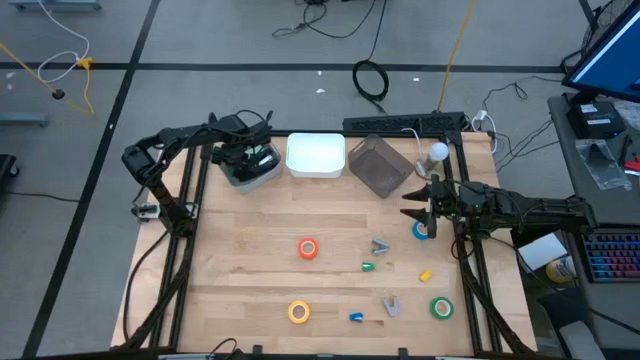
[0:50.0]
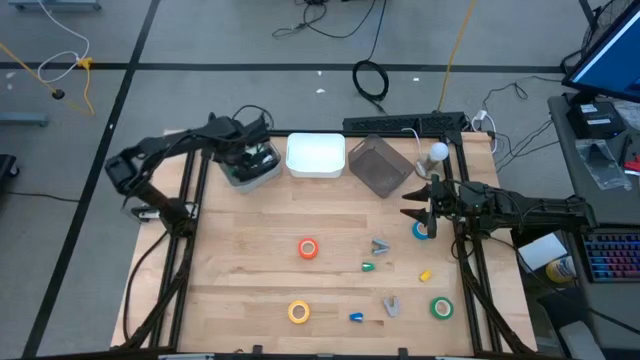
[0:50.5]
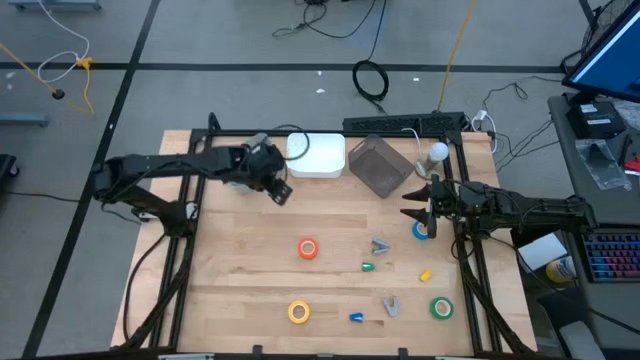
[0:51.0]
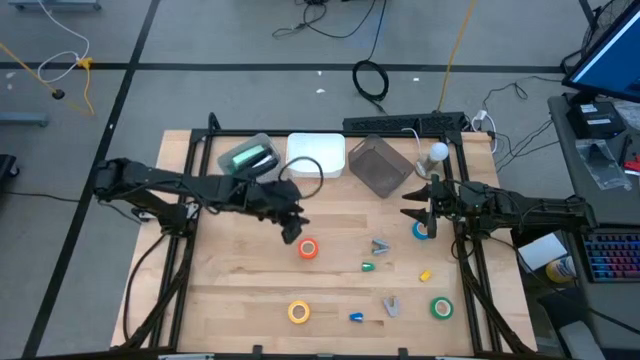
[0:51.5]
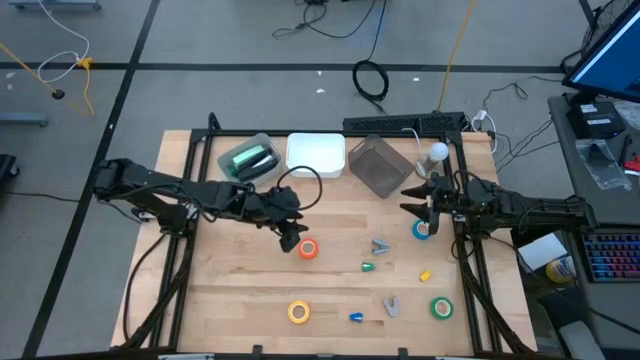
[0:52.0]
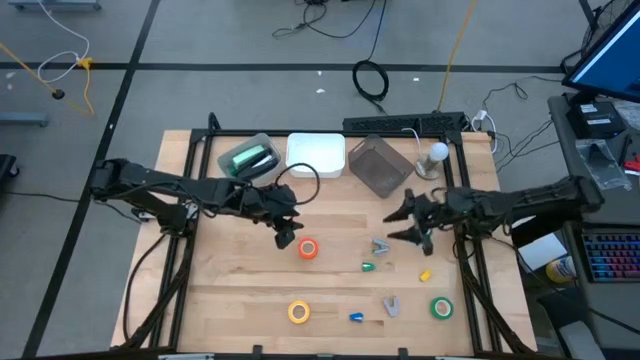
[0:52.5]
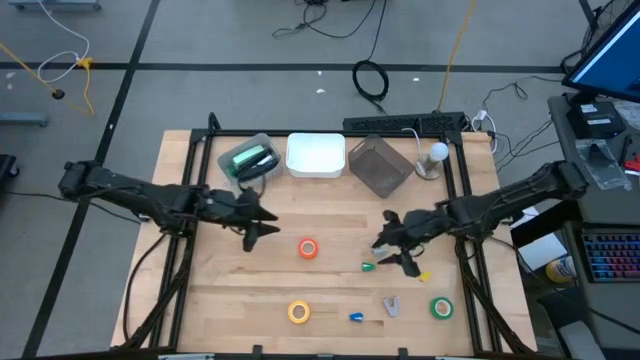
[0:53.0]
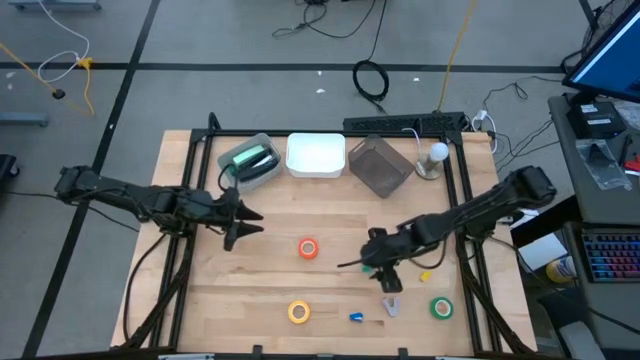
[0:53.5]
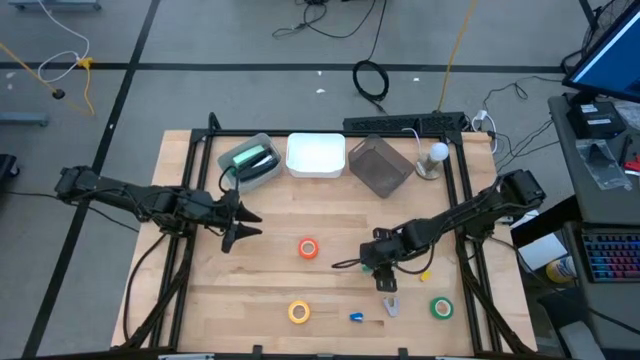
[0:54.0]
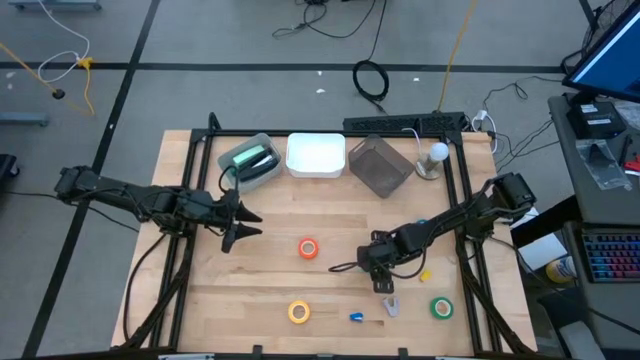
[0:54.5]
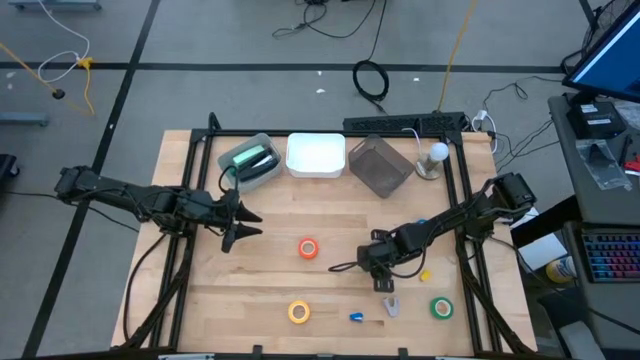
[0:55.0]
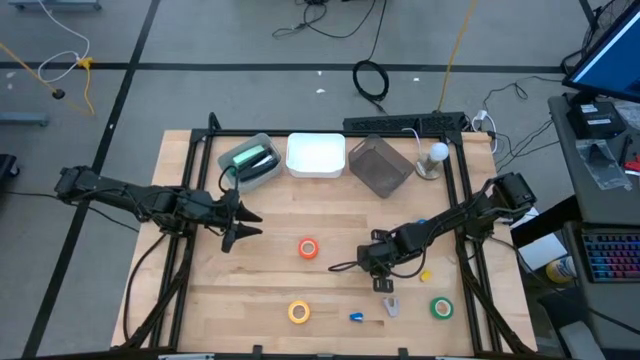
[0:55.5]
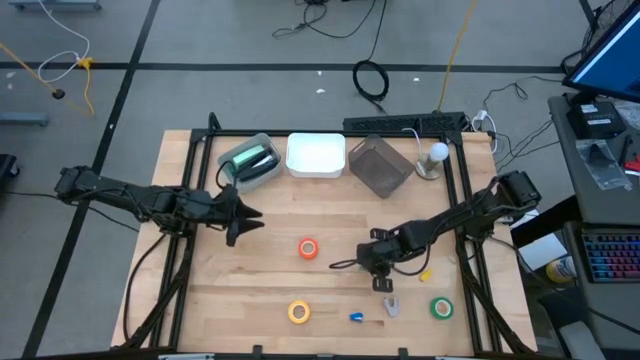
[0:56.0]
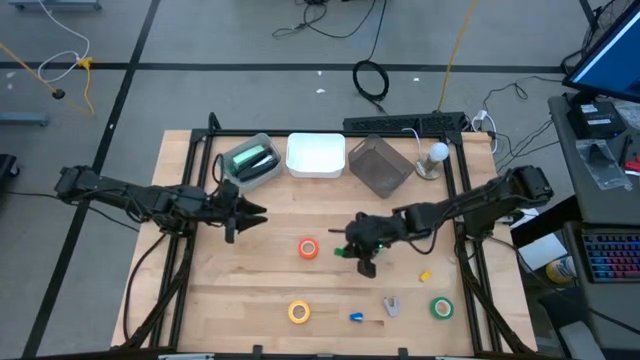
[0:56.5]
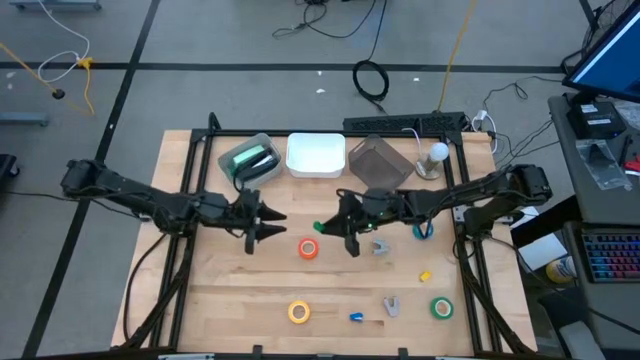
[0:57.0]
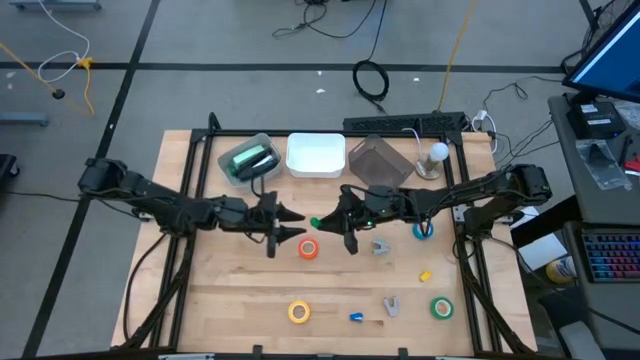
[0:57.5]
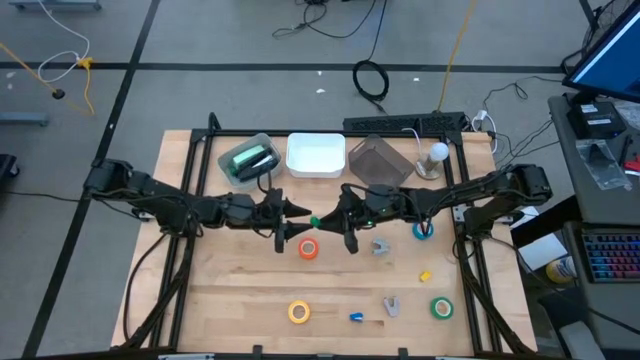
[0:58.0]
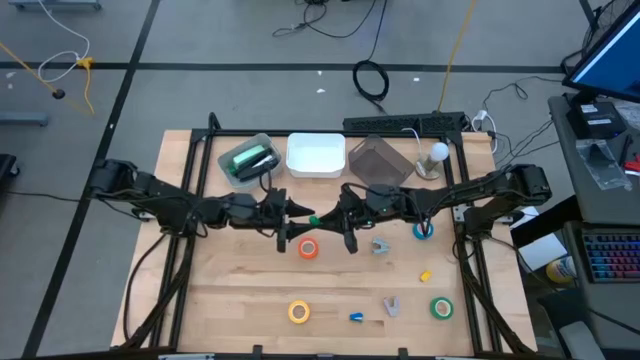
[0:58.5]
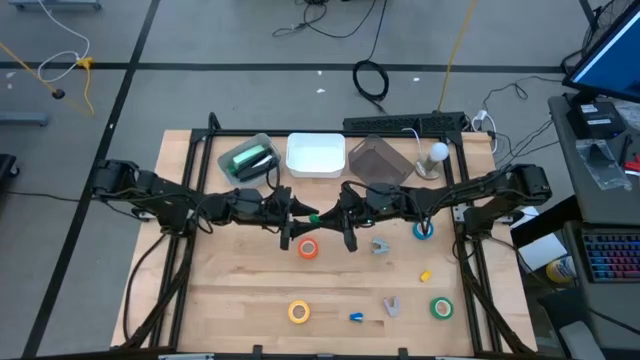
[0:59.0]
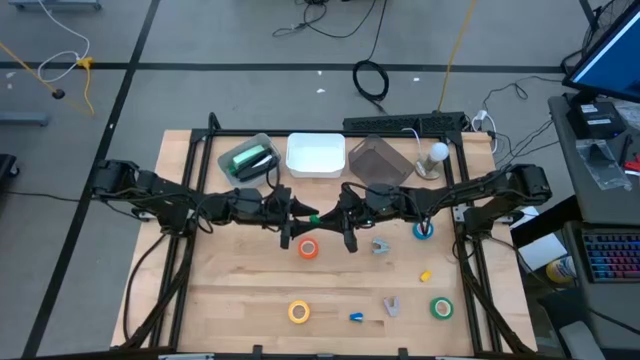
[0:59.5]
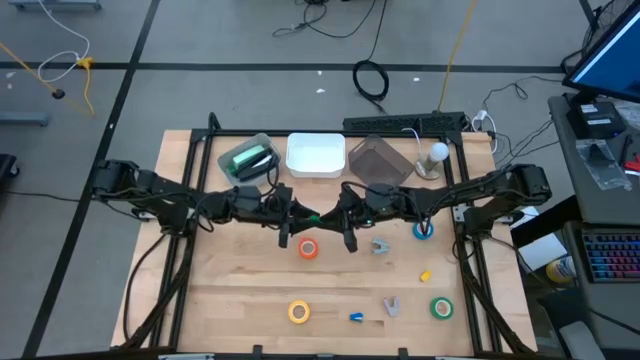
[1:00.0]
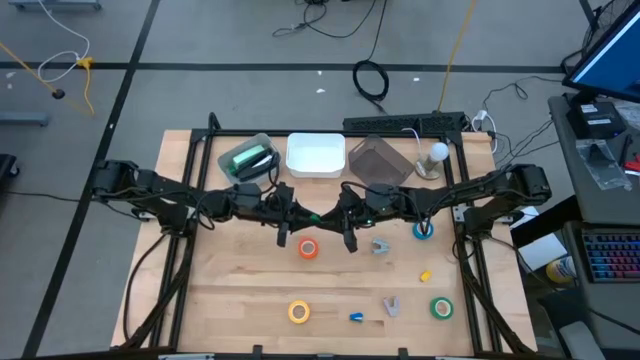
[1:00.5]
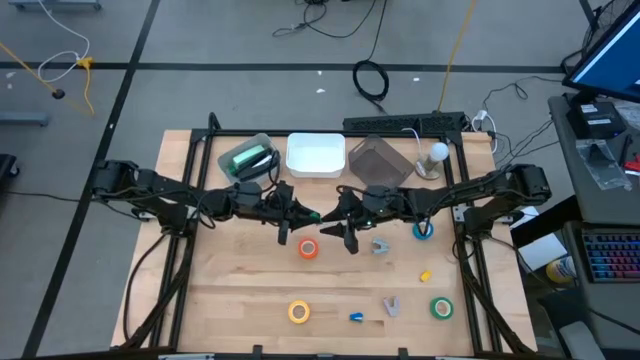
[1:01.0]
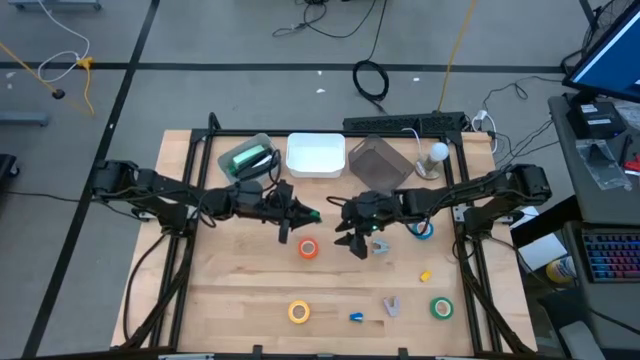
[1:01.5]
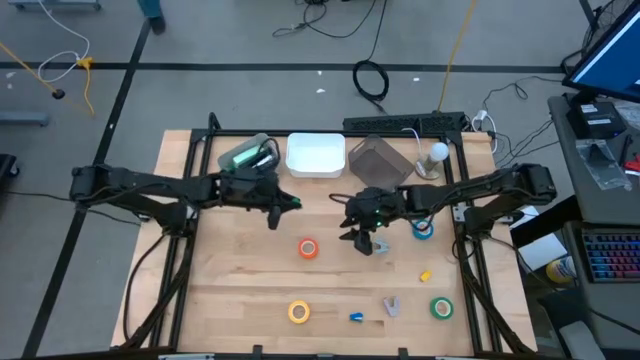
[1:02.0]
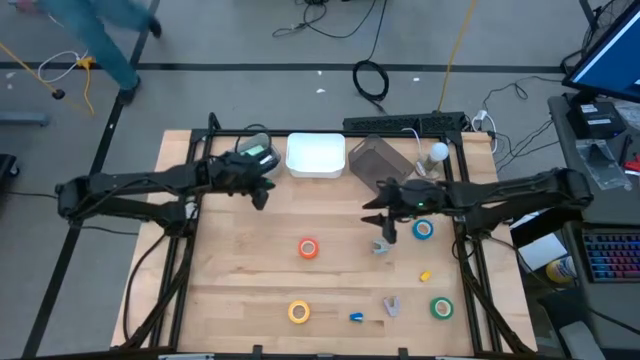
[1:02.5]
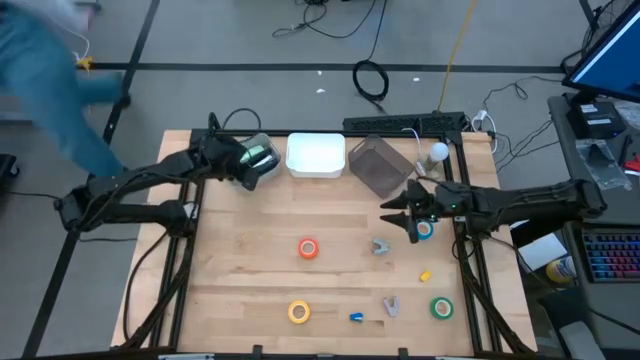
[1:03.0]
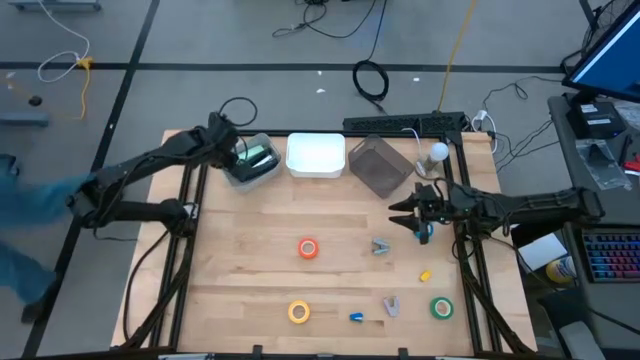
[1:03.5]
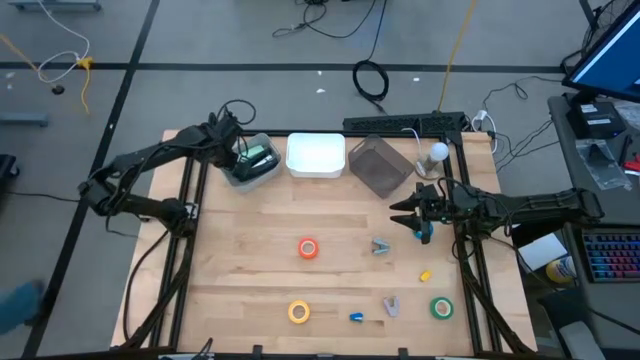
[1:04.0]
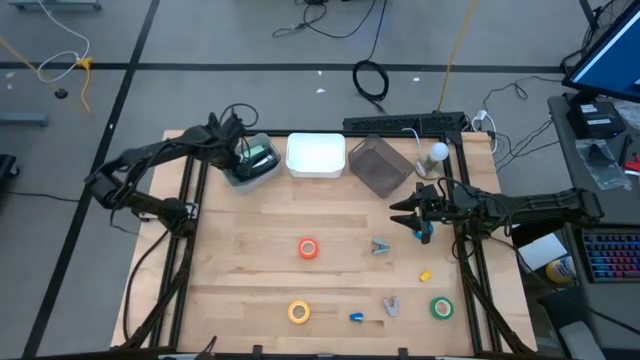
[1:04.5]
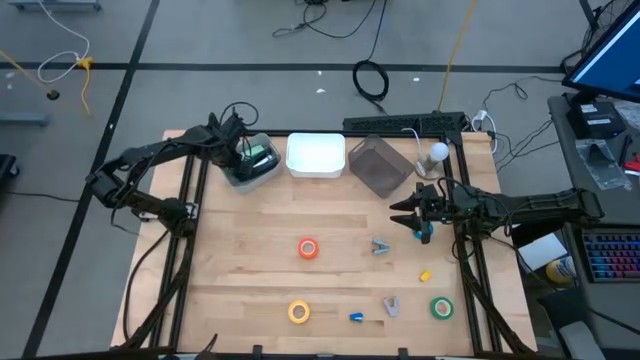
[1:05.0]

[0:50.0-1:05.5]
Task: Pick and place Stapler, Stapler remover, tape
Put the green stapler into the gray bin

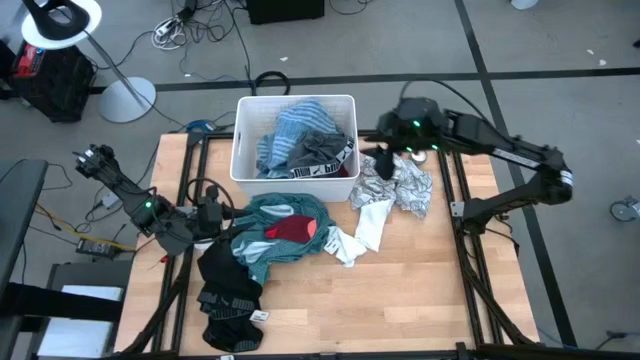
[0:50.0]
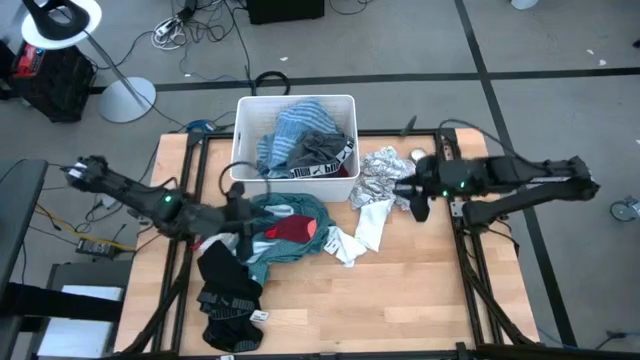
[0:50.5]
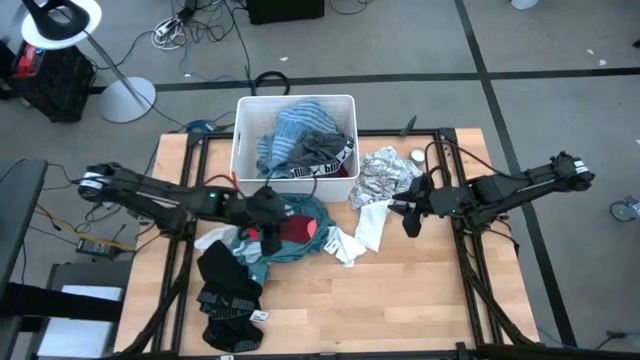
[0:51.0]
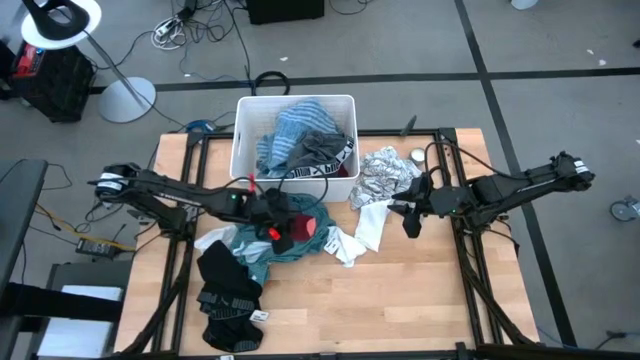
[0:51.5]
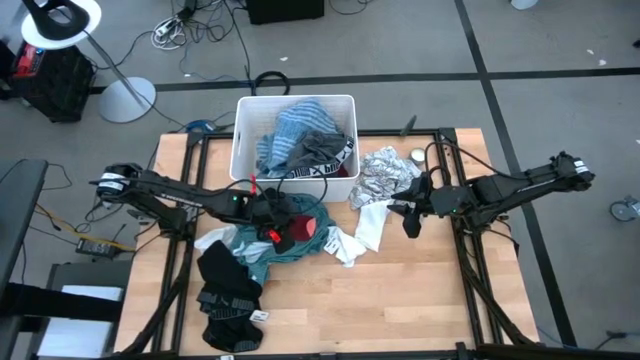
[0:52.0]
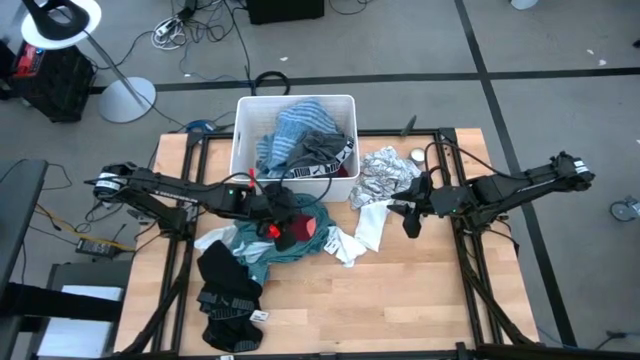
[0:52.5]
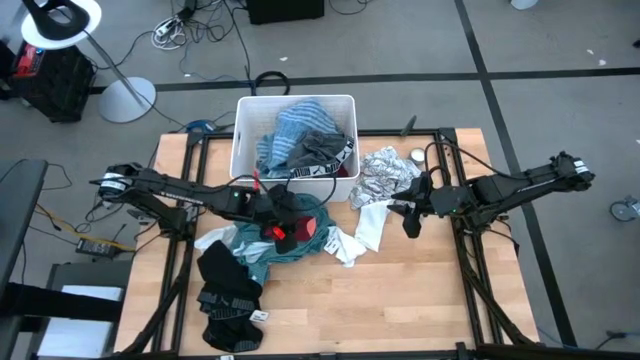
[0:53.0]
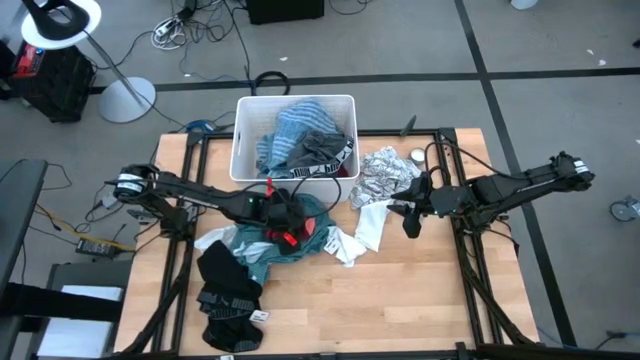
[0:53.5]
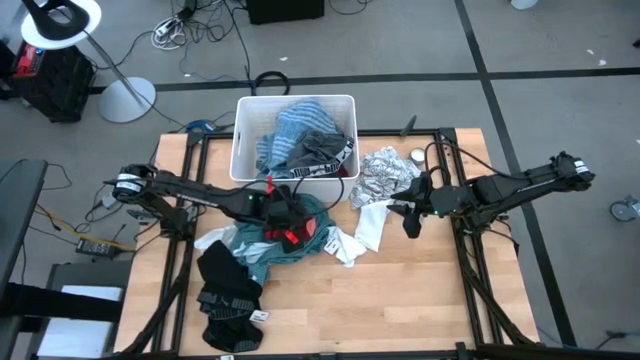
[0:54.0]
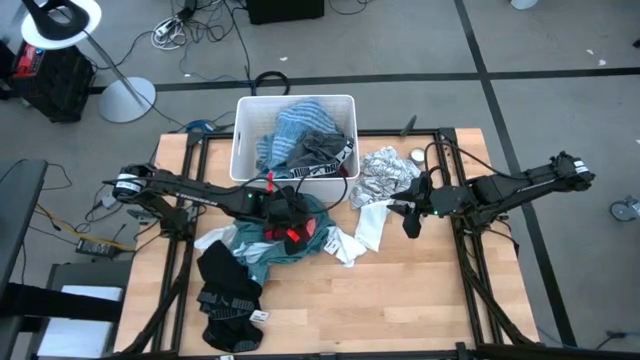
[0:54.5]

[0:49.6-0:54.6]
Task: Sort clothes
Put the red sock into the white laundry bin

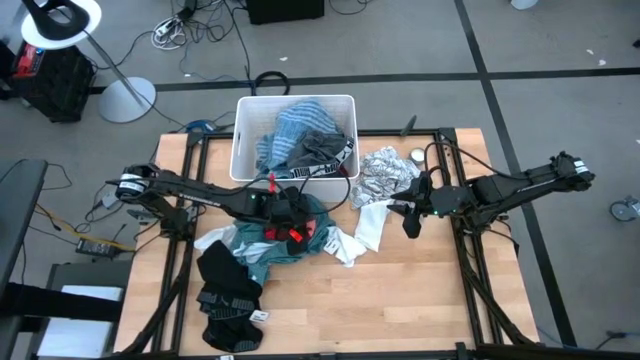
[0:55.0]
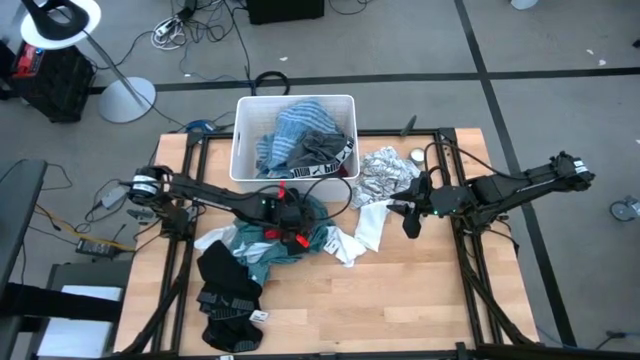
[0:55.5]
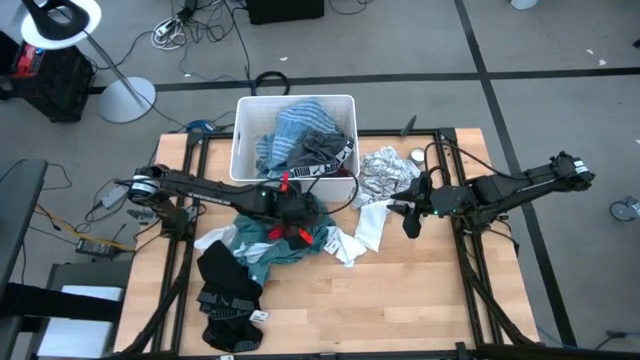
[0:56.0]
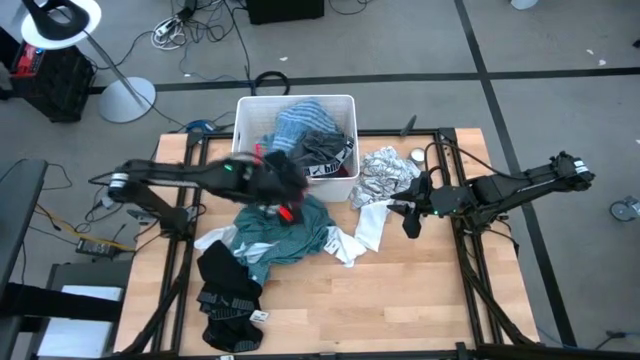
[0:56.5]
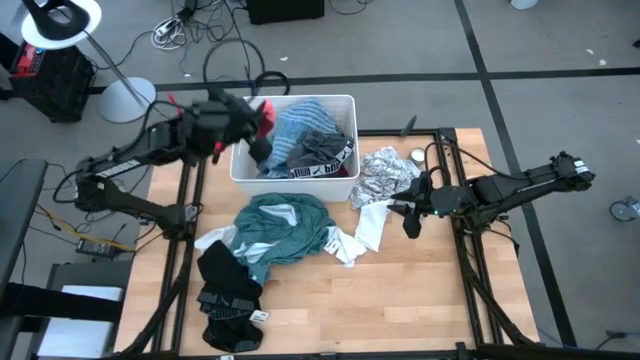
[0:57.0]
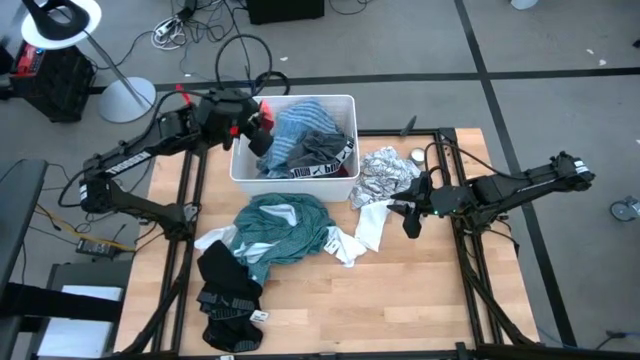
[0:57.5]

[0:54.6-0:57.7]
Put the red sock into the white laundry bin
